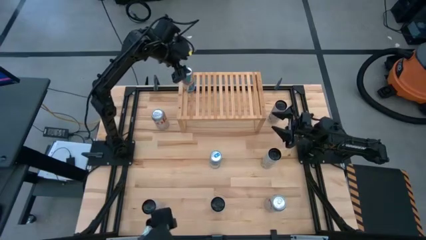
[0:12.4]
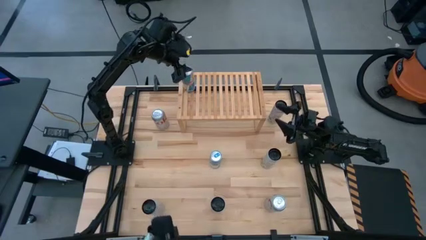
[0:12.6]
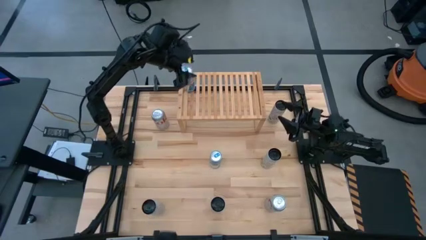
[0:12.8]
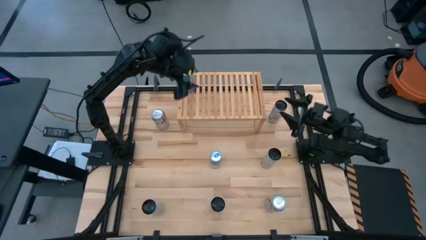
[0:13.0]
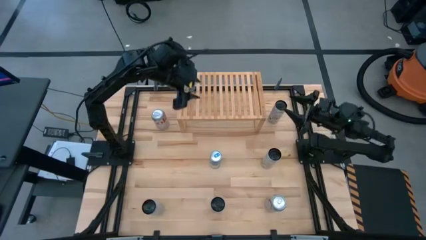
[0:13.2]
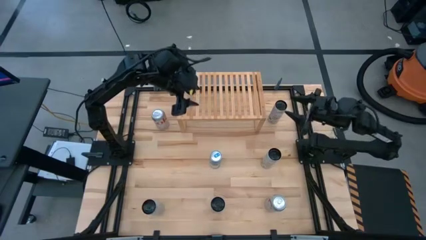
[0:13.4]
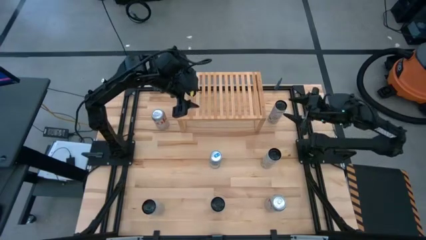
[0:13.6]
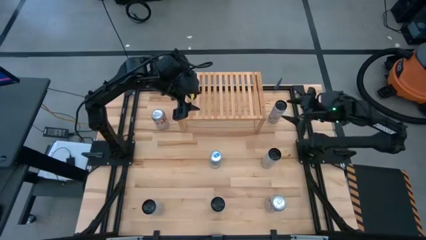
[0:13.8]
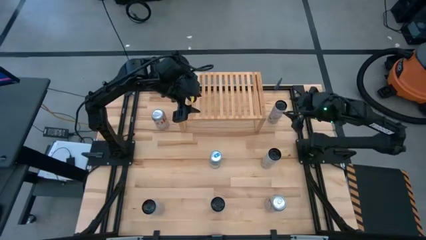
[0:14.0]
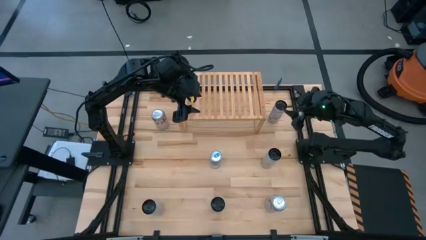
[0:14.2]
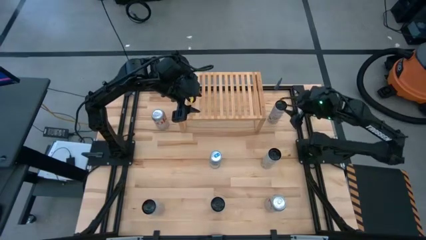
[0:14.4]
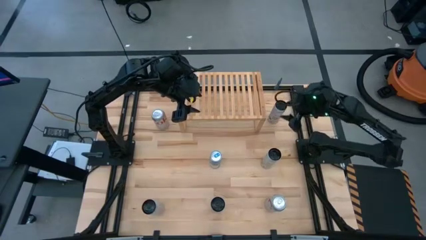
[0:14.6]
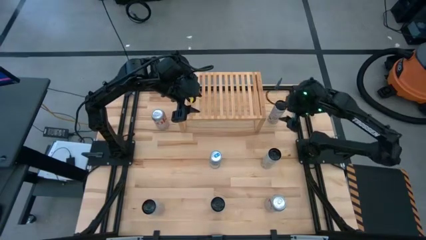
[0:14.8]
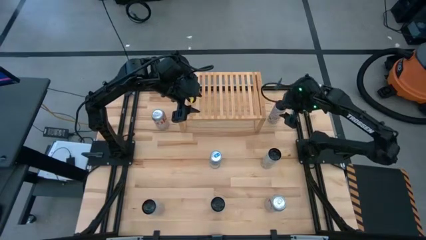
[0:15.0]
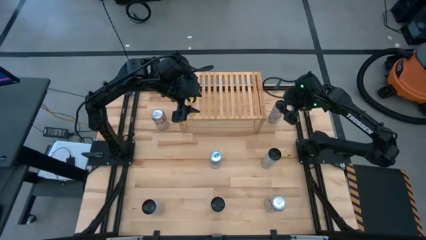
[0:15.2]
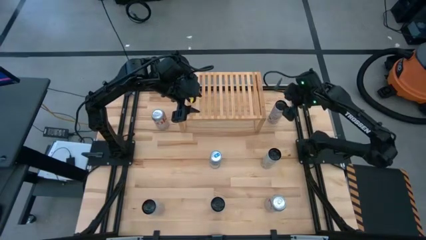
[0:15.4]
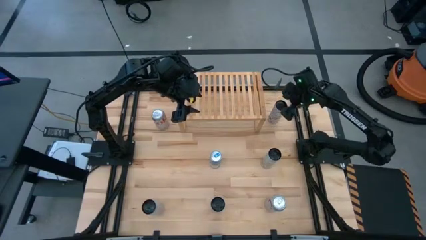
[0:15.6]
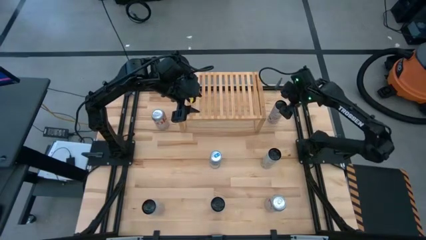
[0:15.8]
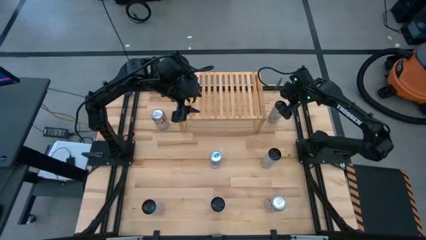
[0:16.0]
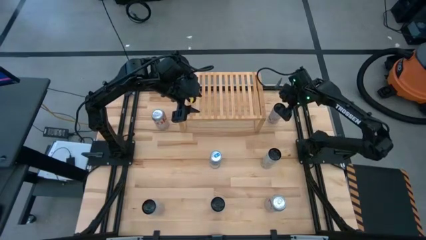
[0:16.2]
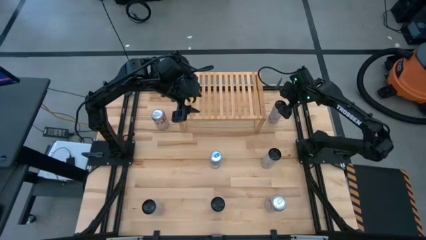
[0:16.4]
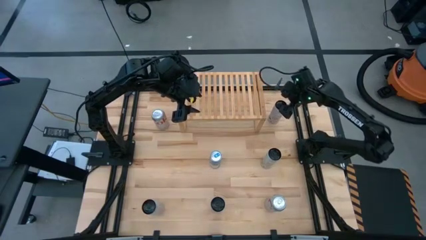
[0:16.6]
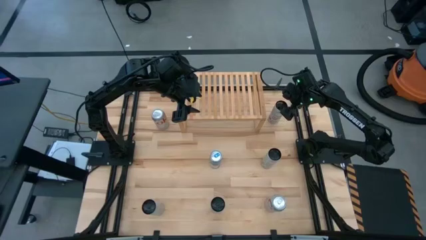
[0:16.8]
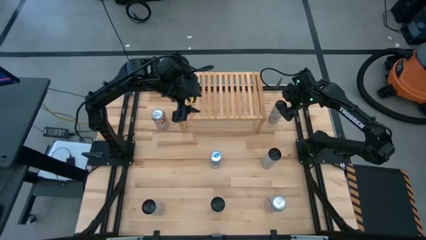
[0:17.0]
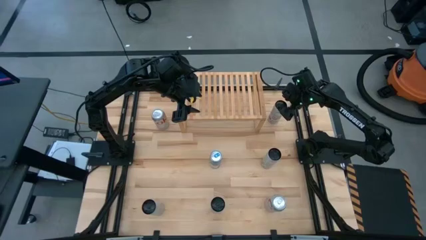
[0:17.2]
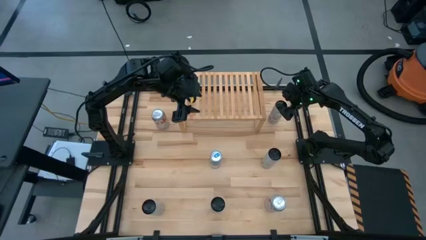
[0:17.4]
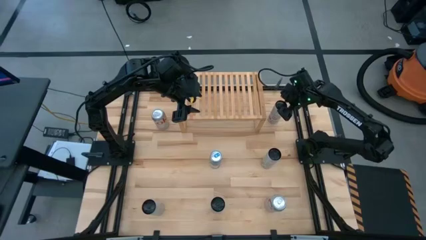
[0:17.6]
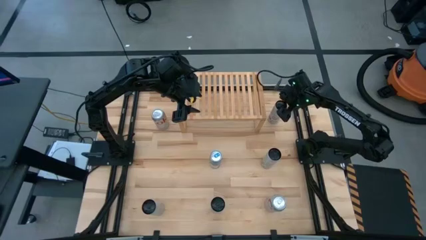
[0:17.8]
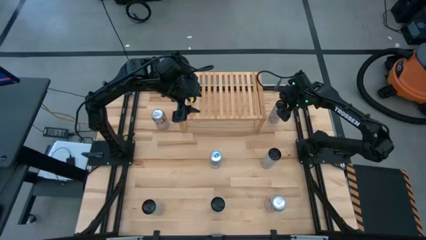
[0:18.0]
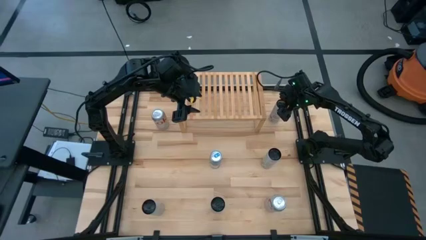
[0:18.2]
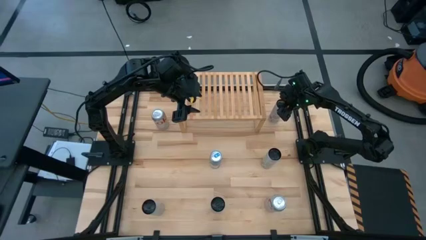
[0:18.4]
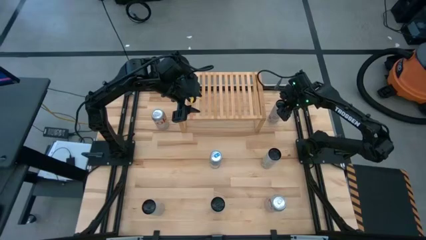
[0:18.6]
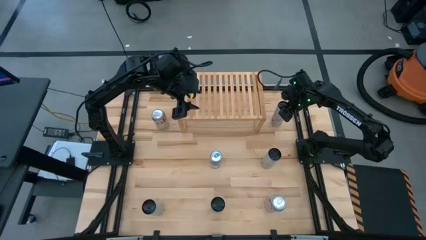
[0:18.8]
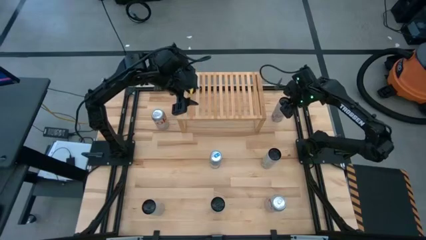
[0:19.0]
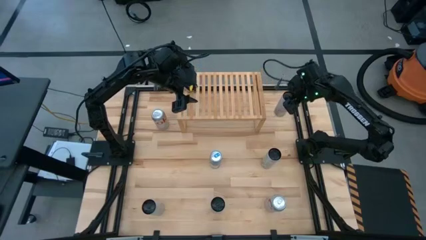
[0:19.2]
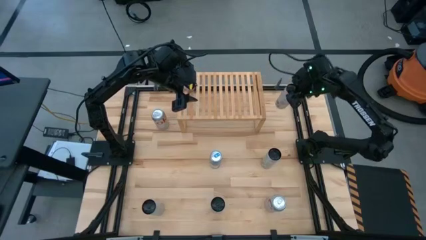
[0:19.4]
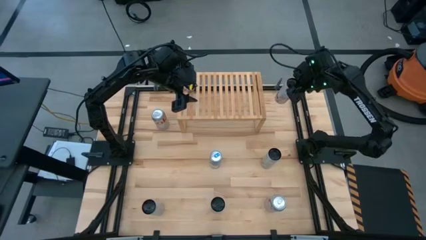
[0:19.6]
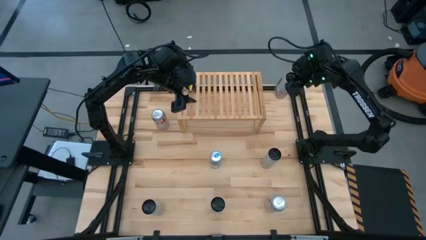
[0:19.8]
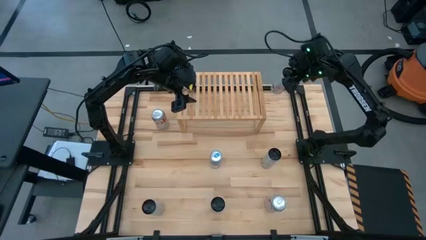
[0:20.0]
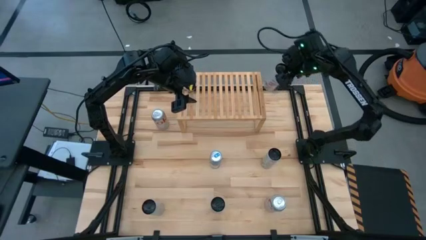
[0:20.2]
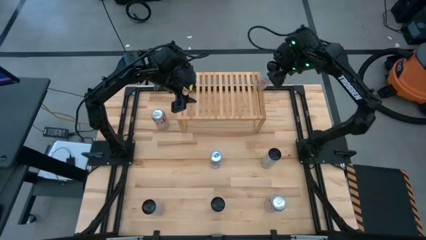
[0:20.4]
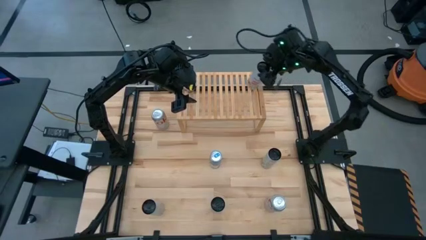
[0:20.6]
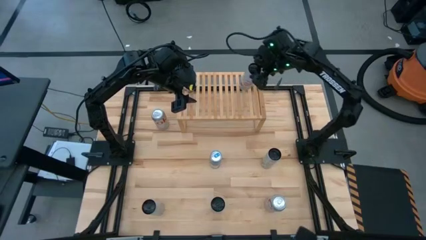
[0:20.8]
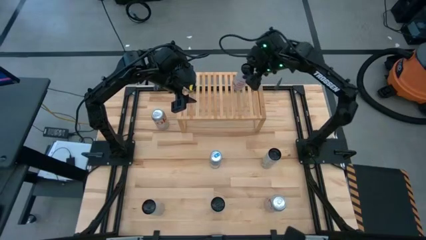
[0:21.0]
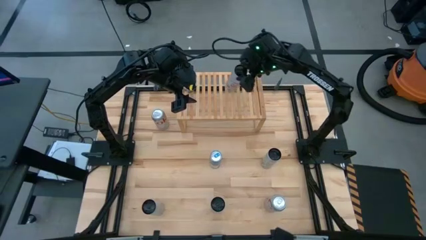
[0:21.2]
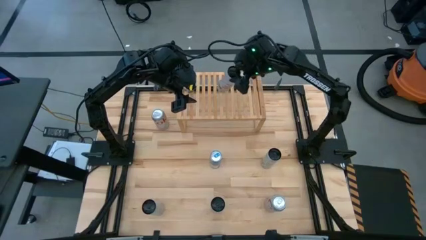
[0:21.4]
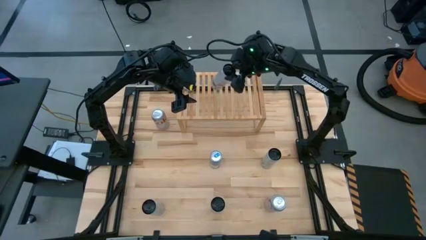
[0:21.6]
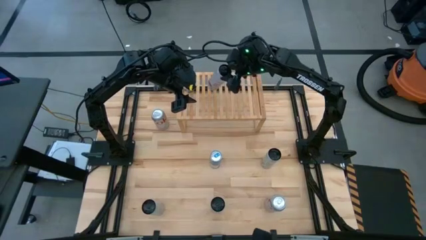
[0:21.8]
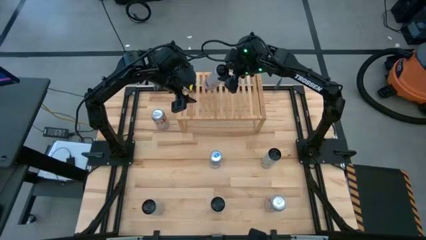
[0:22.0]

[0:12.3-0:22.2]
Task: Place canned beverage on shelf
Put the top white and pink soda can on the shelf

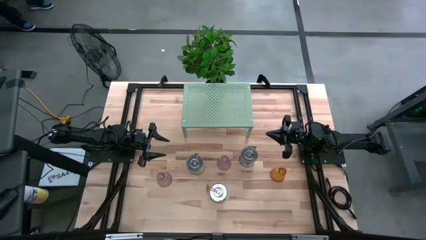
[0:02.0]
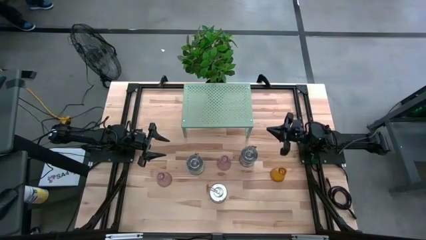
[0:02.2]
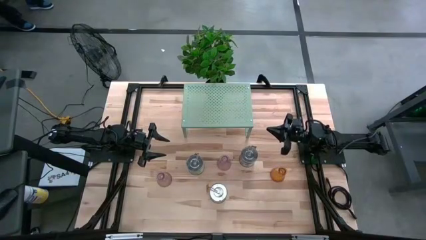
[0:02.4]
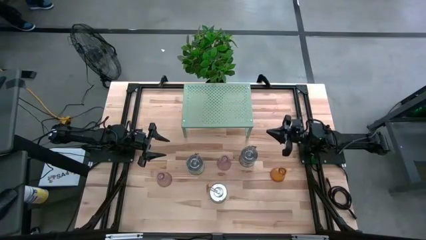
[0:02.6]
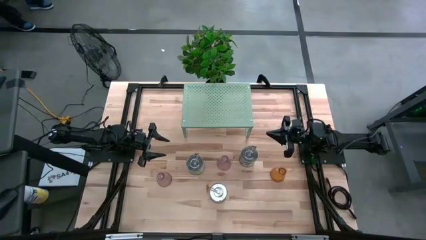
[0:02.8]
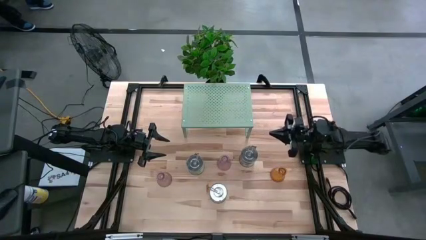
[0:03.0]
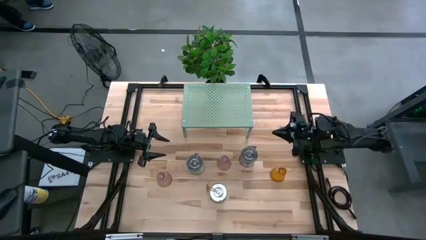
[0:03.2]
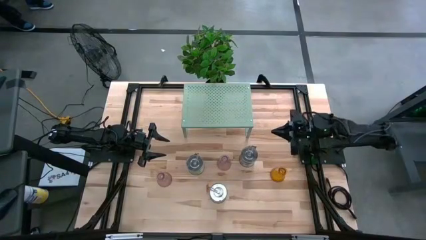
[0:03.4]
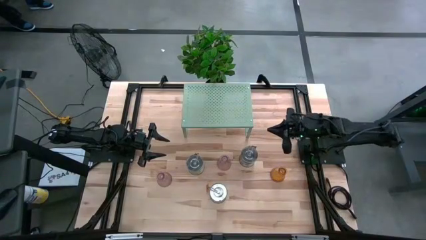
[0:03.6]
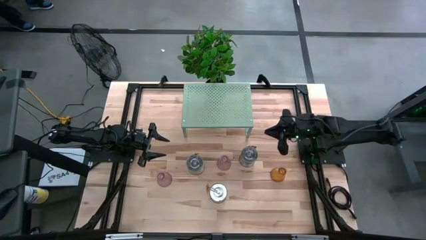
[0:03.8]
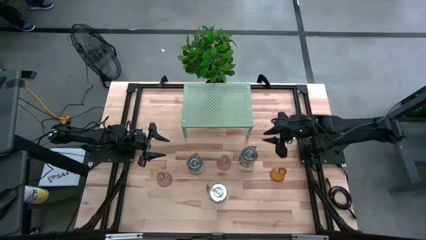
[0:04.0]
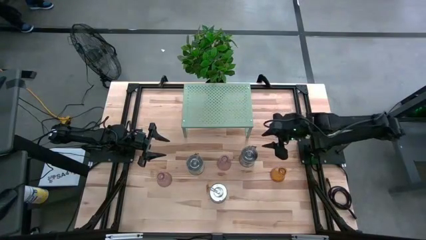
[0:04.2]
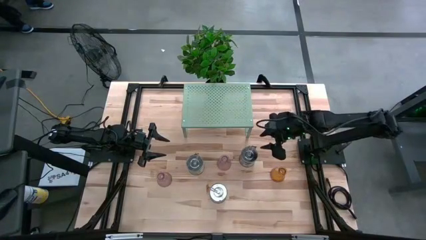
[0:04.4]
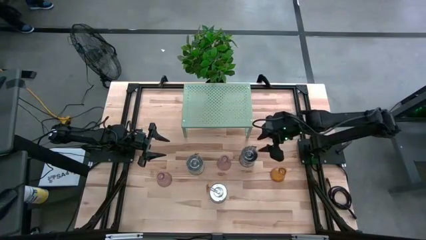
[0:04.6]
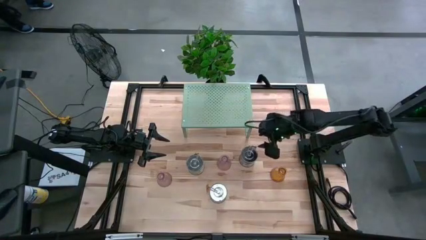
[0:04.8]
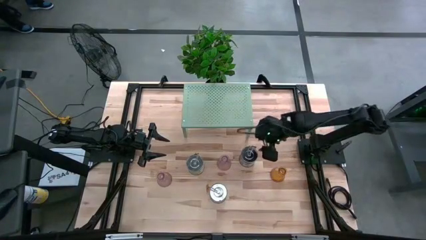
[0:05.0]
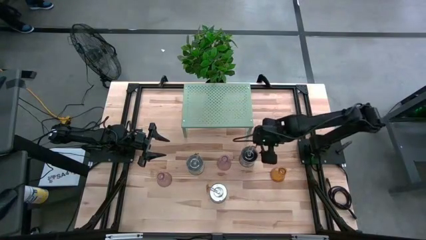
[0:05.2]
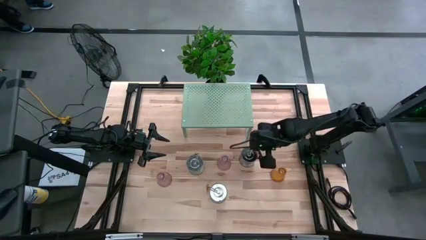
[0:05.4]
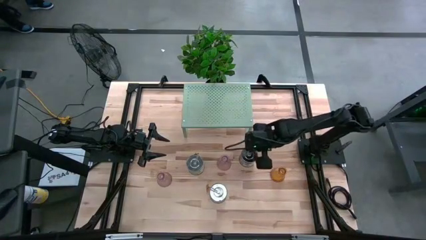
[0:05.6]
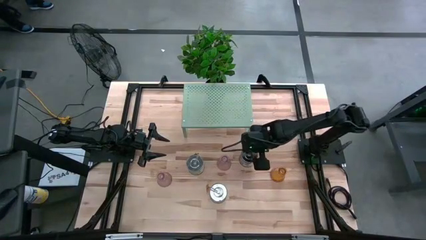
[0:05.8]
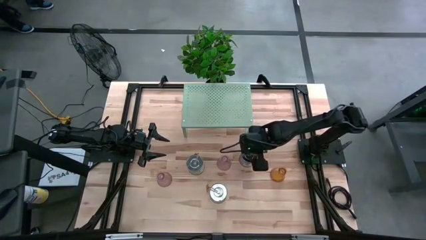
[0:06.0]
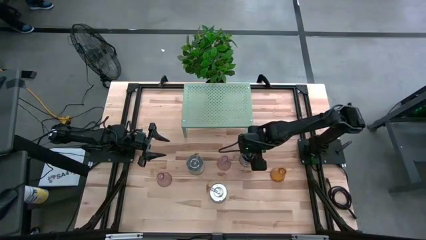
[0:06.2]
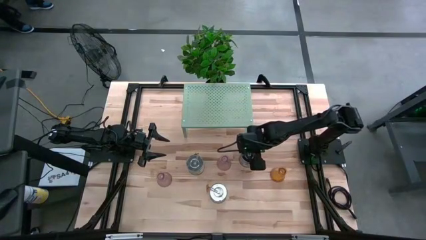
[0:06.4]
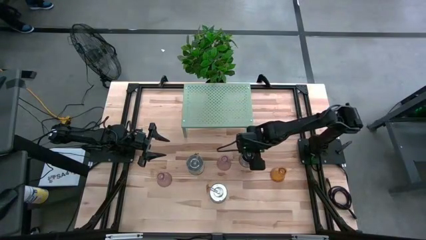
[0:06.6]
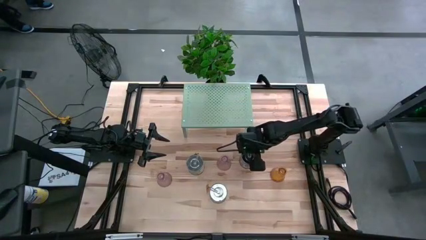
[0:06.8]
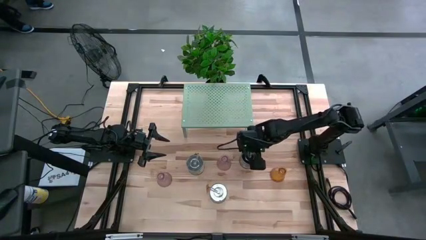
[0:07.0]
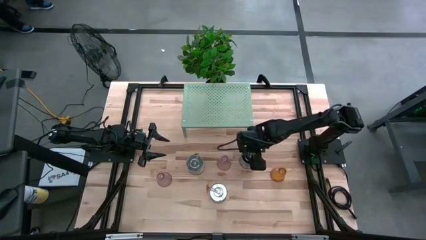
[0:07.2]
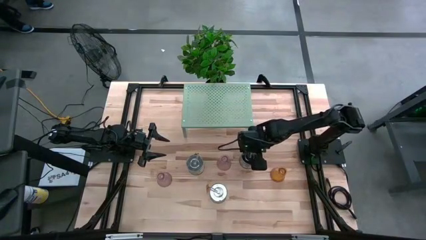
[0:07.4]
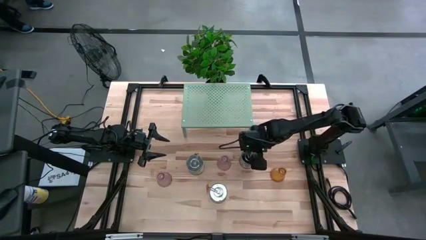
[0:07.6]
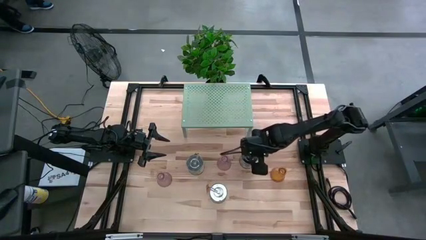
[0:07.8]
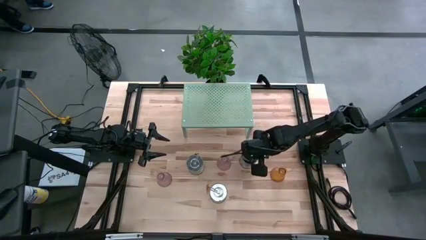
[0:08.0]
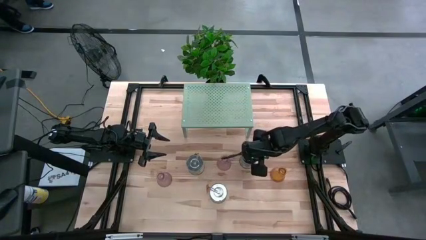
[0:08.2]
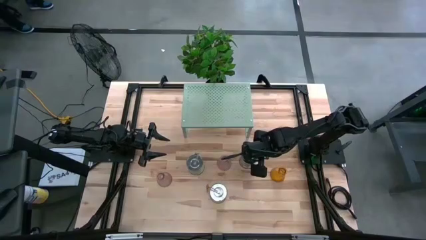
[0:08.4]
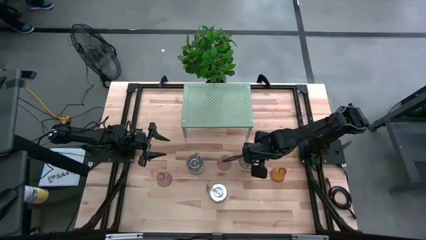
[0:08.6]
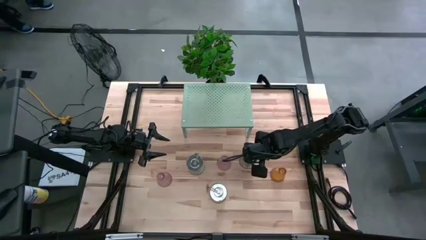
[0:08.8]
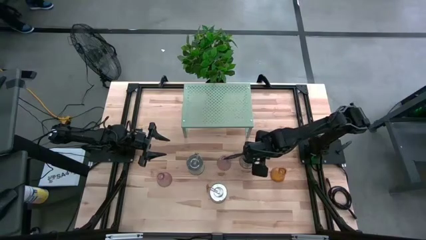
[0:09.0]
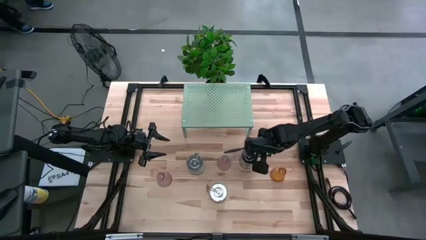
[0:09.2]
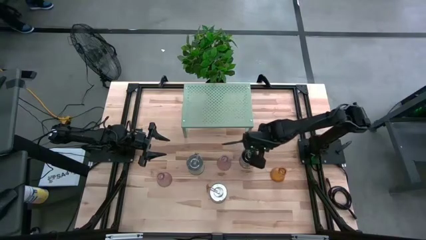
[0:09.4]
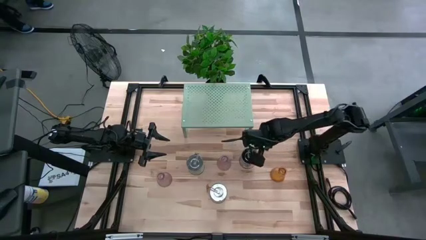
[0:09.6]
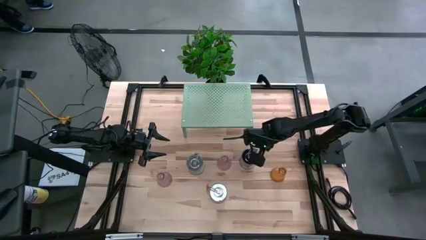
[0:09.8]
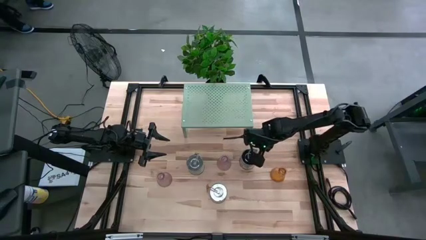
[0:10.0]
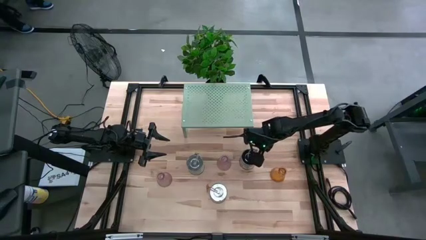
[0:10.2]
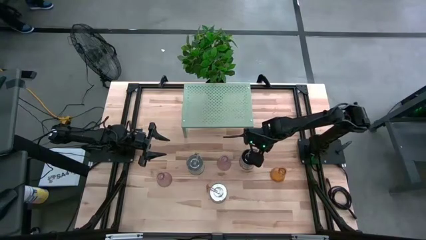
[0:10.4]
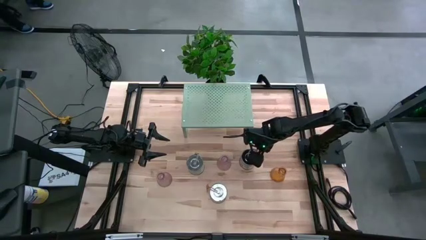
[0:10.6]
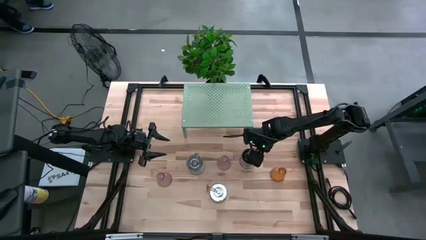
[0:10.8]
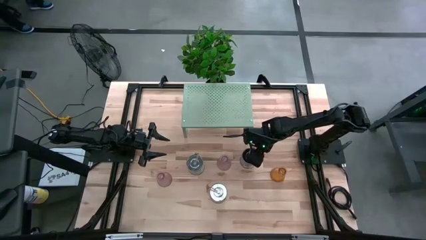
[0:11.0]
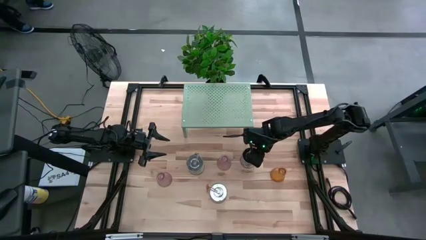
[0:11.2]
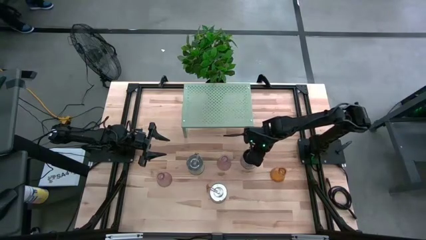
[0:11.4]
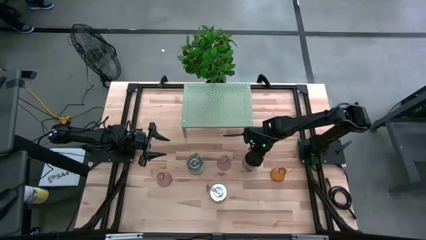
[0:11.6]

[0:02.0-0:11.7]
Task: Pick & Place candle stick holders
Put the top right scented candle on the shelf
